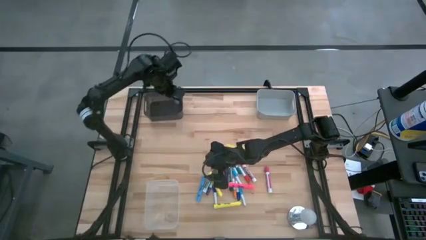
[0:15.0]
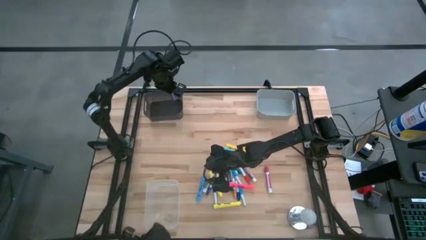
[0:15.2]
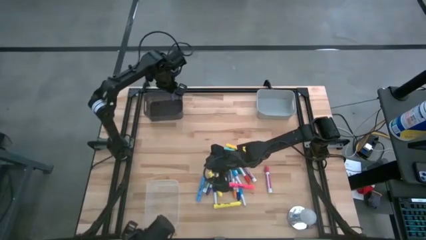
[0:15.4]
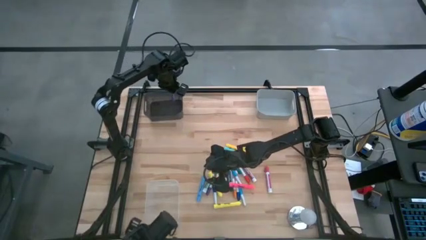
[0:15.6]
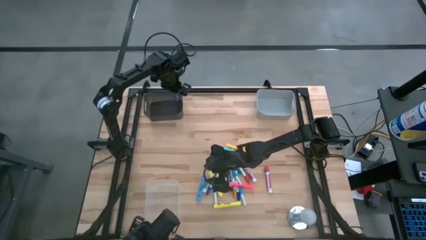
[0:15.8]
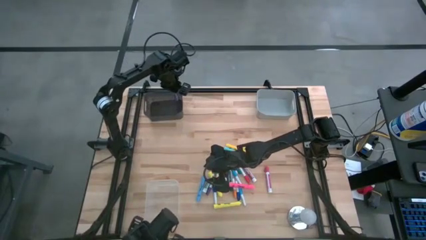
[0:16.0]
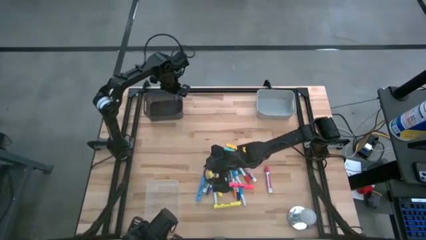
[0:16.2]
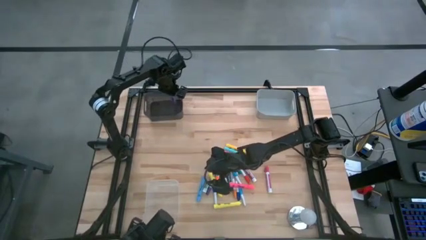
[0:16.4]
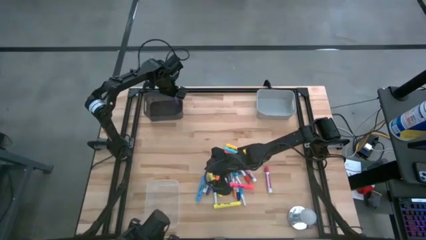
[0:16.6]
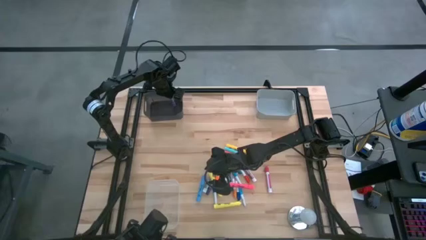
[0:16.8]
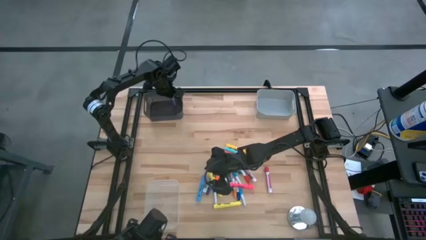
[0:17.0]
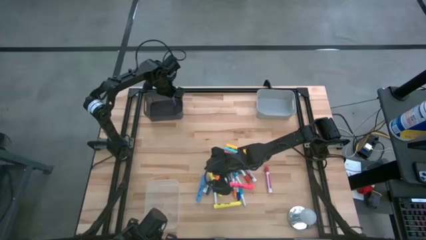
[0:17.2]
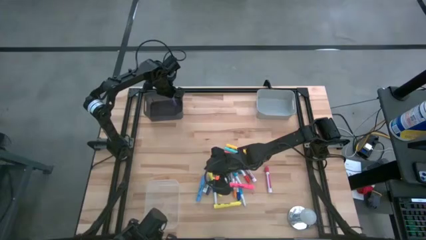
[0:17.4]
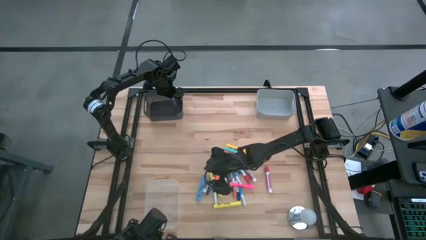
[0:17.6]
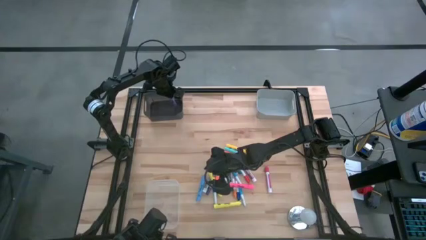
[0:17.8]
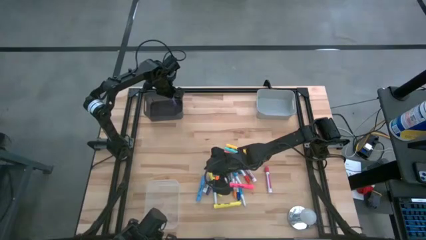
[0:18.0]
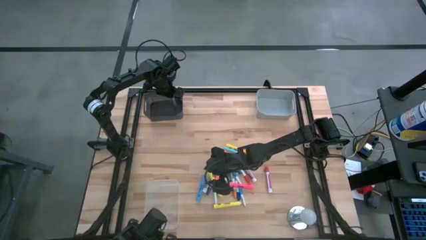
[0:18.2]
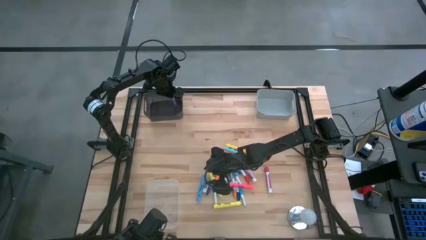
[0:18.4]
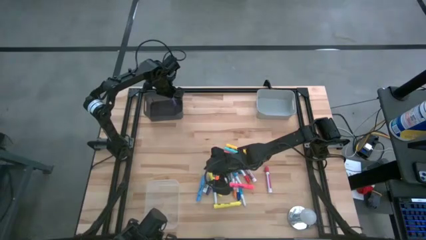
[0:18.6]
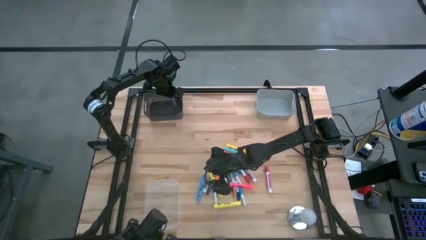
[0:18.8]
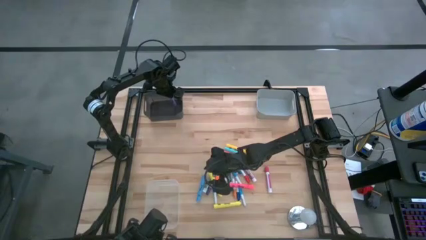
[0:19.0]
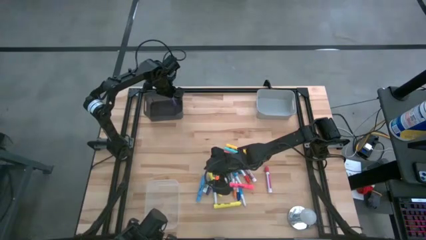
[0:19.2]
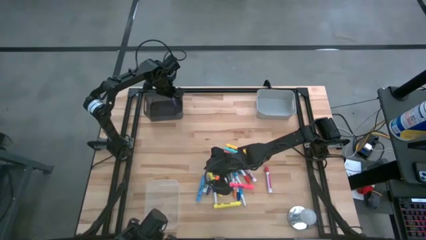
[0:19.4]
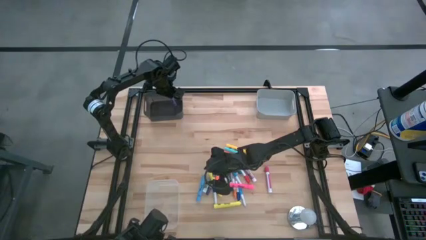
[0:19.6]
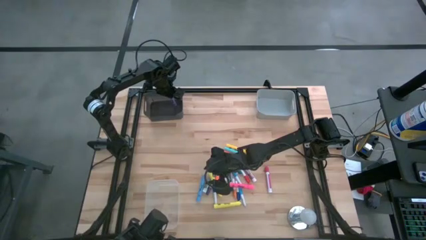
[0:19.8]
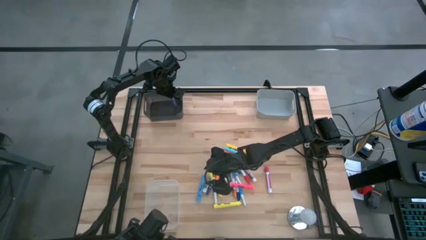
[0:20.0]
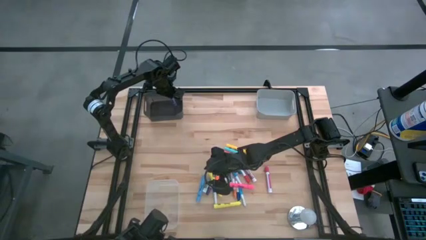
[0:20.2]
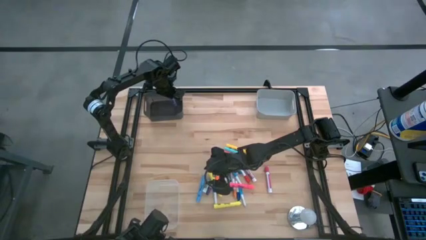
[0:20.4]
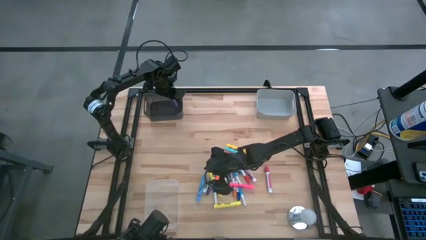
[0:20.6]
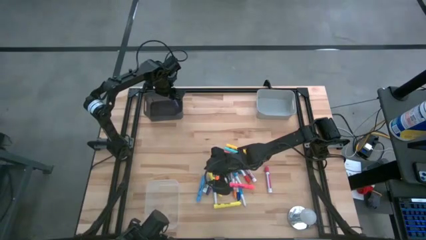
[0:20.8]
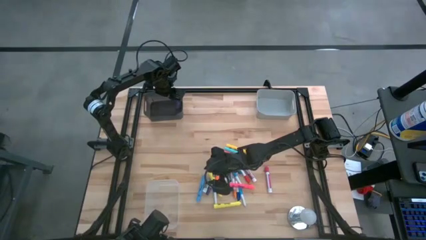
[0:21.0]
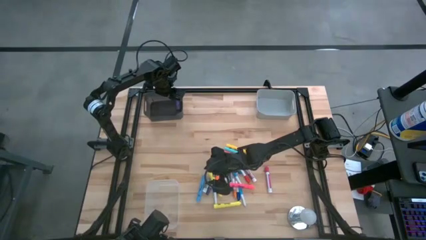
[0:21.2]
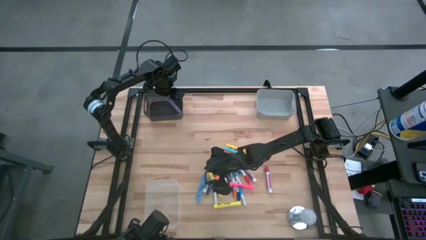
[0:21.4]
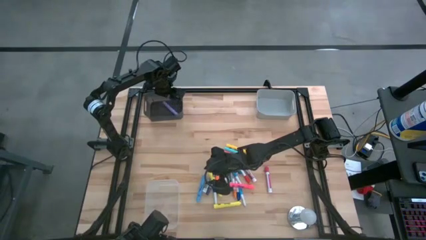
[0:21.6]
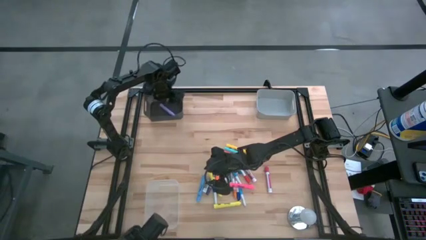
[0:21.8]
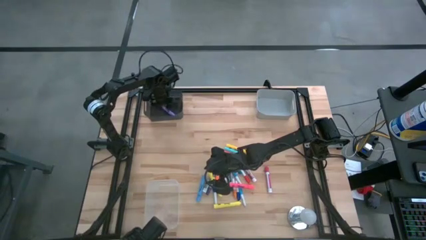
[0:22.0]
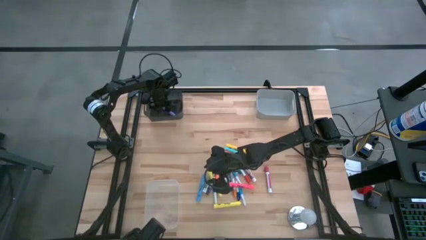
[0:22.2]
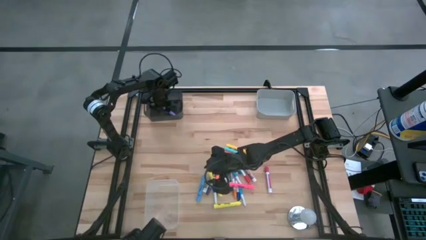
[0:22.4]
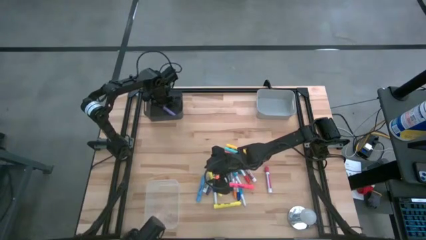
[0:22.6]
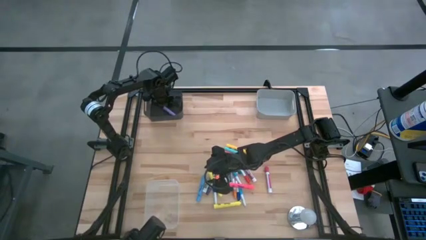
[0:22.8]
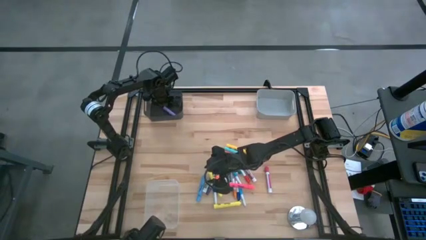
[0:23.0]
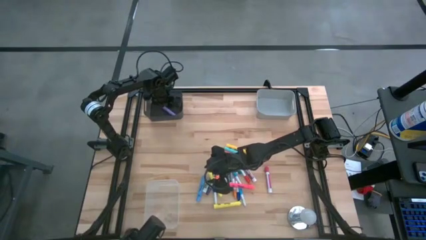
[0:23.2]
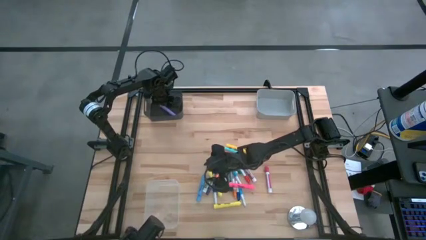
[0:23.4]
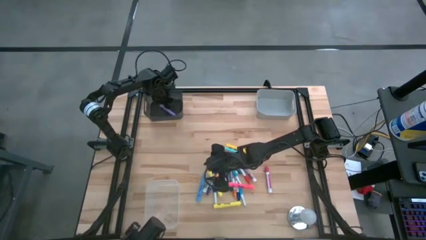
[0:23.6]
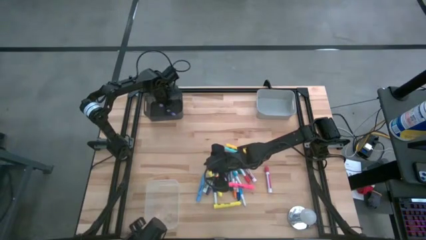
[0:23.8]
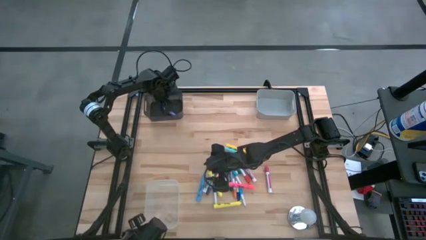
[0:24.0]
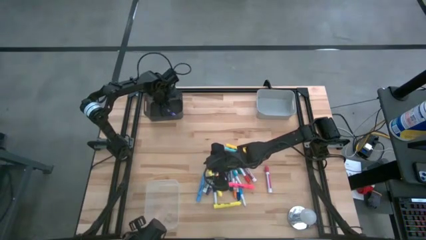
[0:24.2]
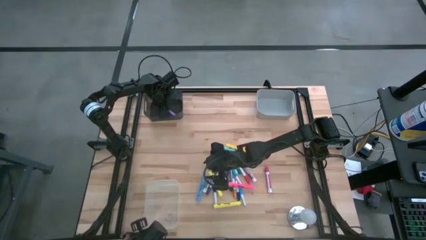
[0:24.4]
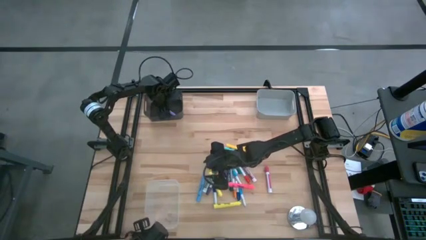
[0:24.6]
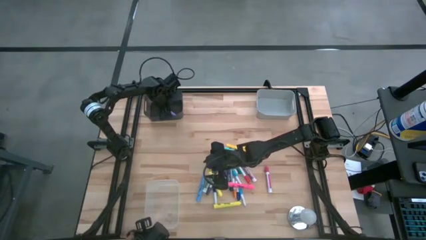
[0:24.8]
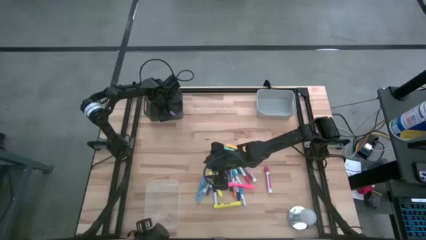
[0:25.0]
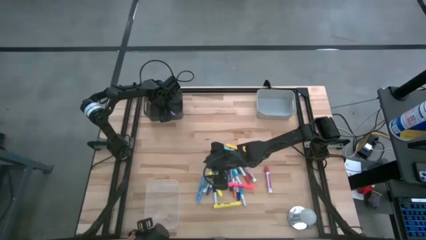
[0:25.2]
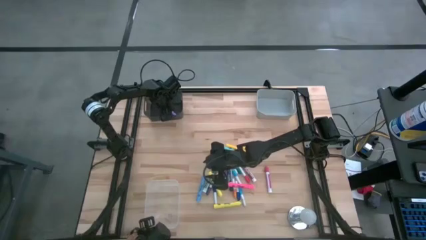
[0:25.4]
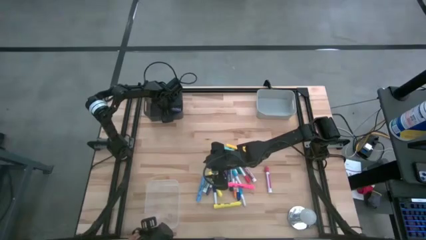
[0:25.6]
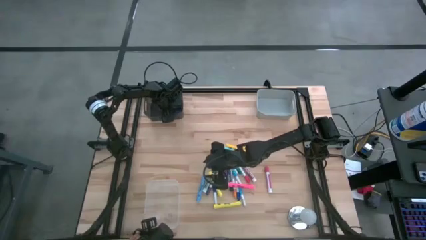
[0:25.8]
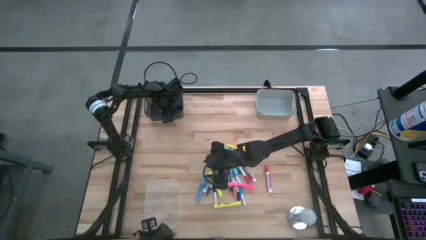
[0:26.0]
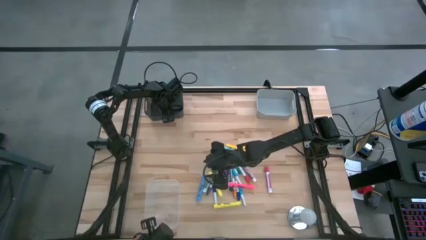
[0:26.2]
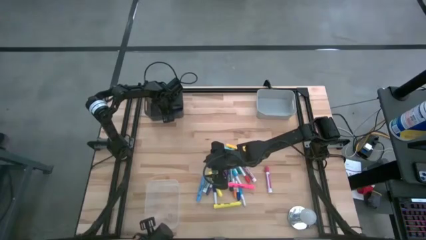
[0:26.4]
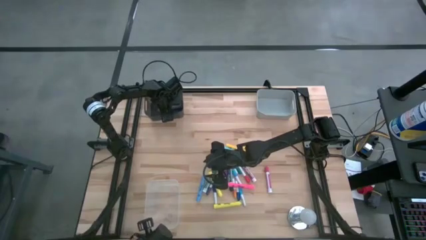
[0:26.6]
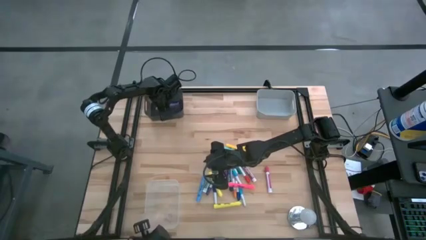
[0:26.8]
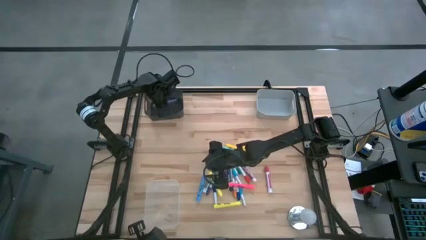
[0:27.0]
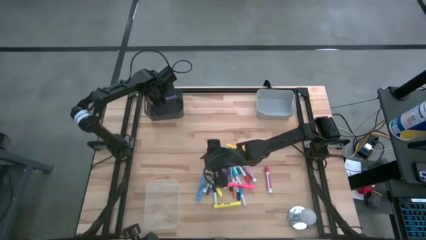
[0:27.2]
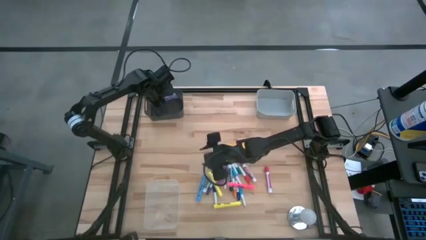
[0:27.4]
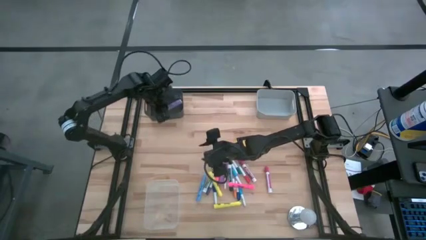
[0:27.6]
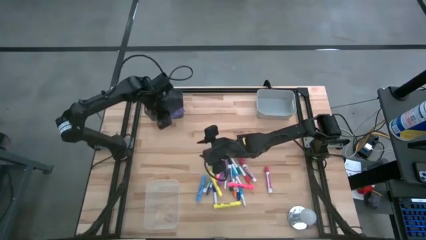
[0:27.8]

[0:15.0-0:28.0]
Task: Pick & Place Markers
Put the violet highlighter pen into the black bin
